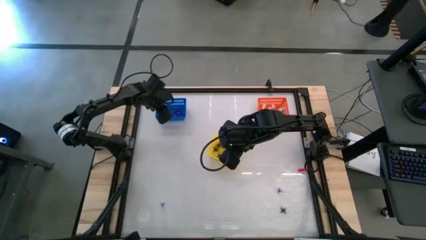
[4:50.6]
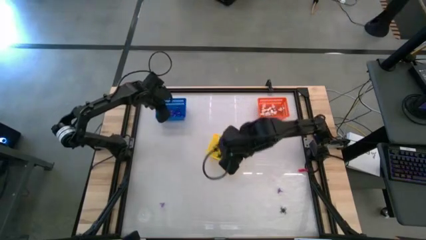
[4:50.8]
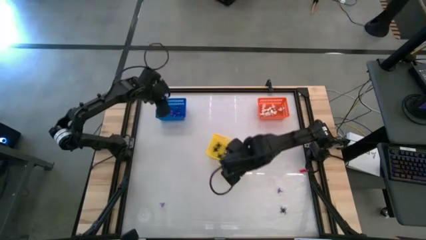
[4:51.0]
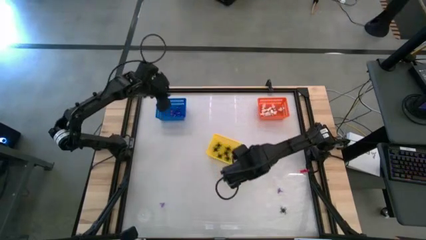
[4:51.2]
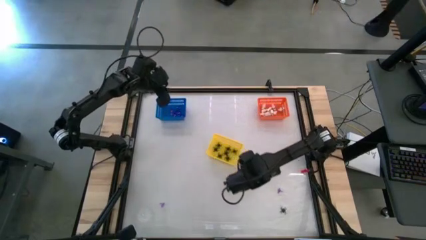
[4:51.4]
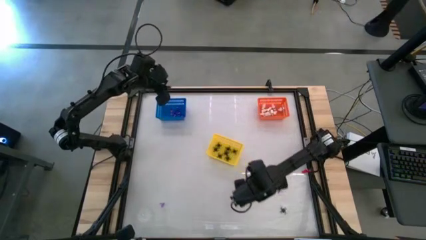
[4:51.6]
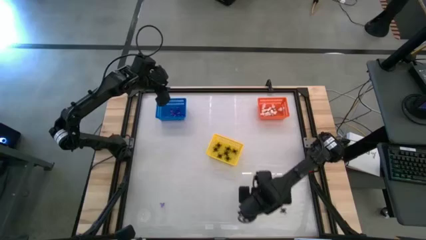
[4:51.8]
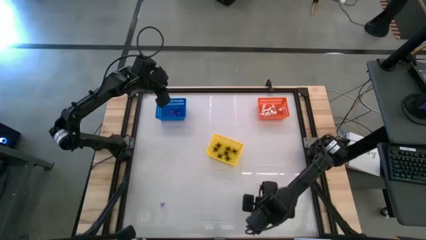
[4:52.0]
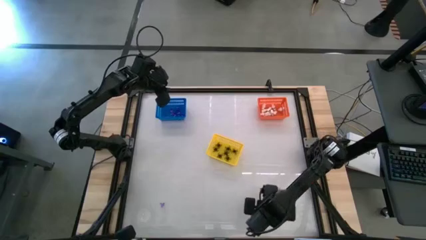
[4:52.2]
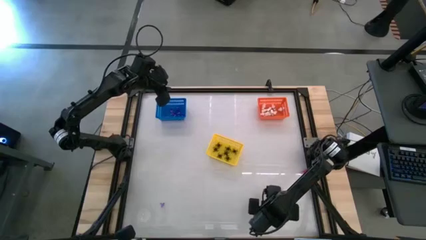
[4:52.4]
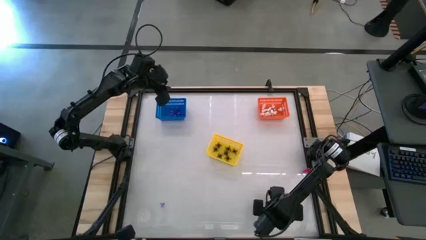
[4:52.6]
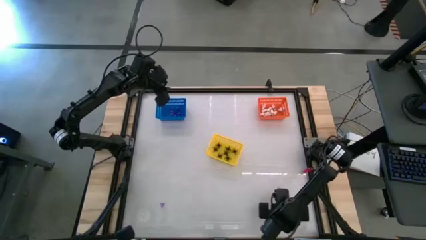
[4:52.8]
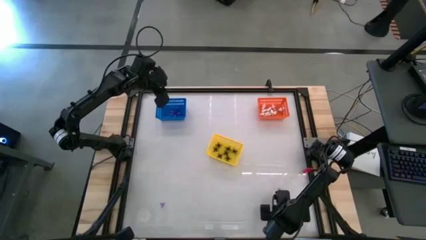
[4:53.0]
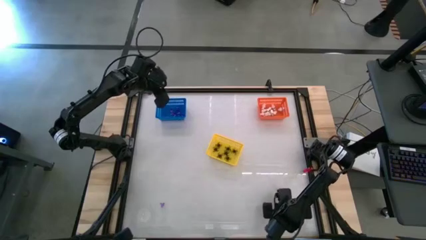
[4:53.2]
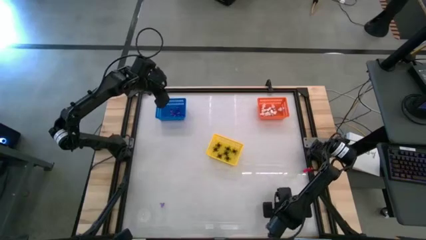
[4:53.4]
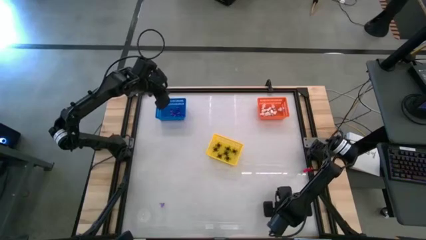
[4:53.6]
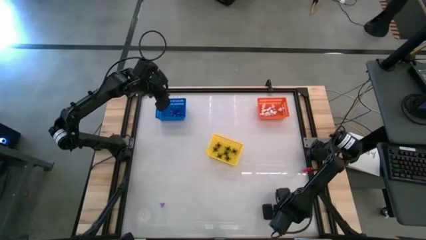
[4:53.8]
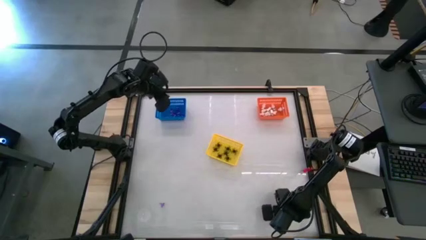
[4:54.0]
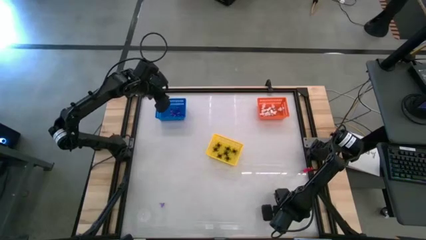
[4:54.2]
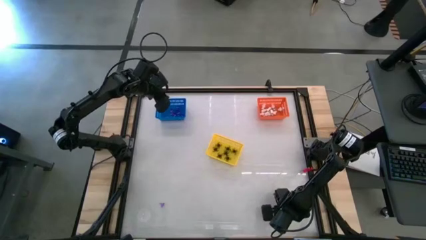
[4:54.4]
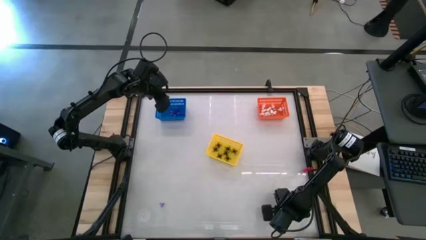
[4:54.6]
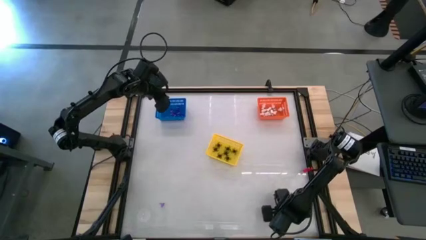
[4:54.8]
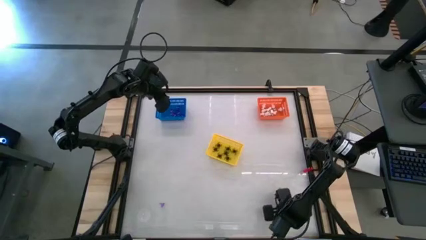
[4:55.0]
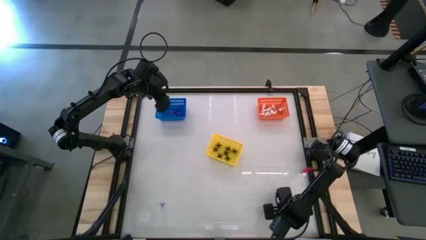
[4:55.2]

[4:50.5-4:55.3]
Task: Sort Halloween decoration
Put the black spider toy into the yellow bin

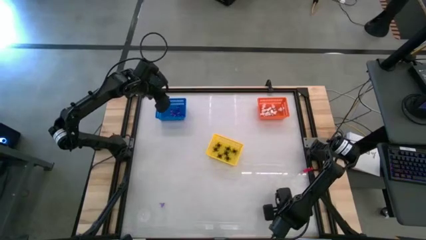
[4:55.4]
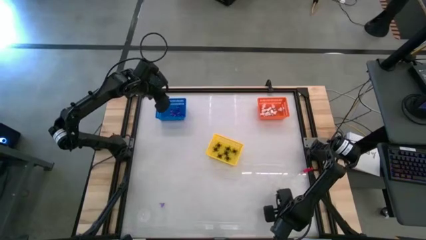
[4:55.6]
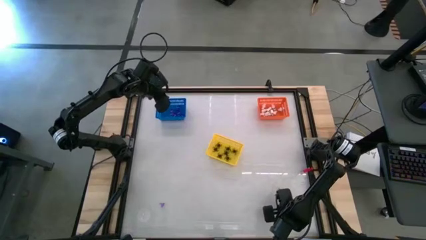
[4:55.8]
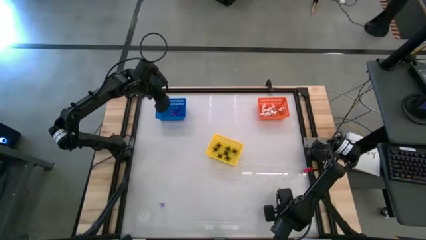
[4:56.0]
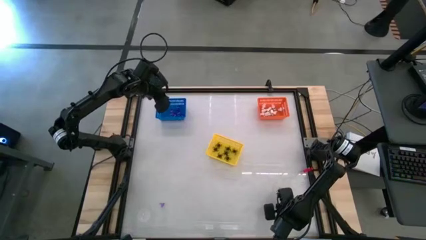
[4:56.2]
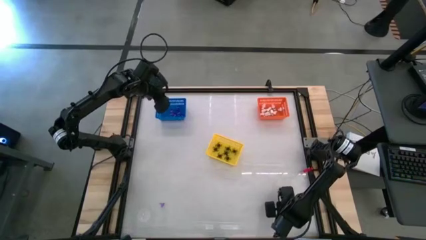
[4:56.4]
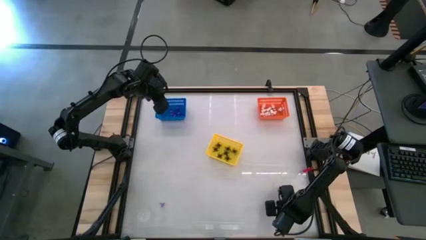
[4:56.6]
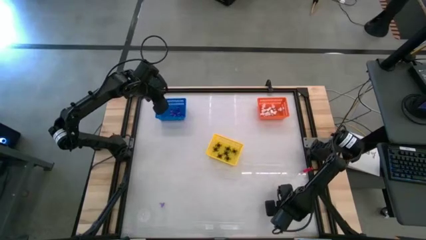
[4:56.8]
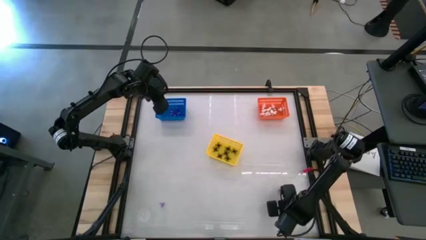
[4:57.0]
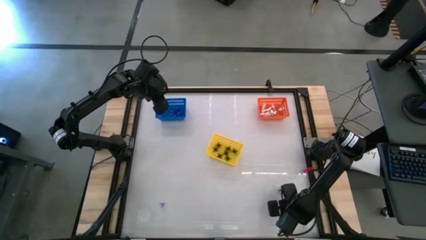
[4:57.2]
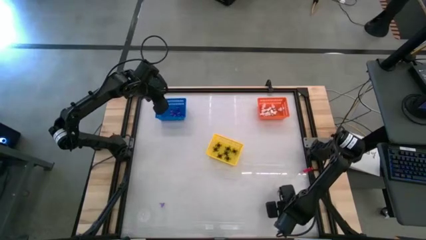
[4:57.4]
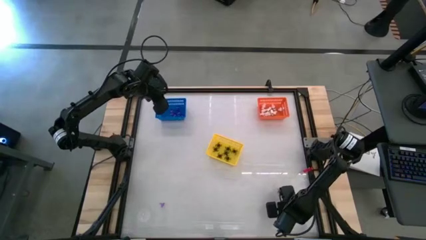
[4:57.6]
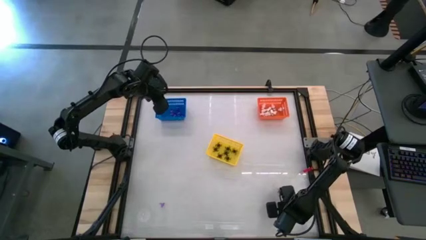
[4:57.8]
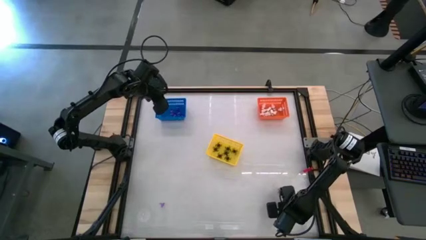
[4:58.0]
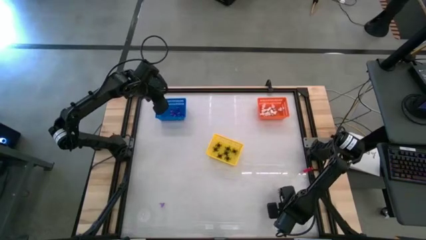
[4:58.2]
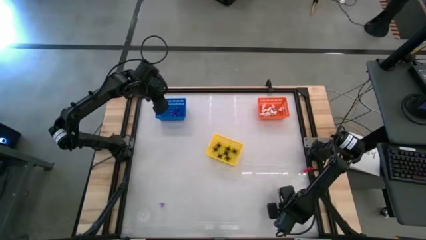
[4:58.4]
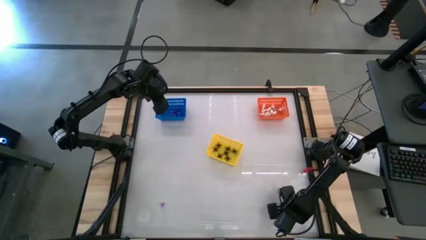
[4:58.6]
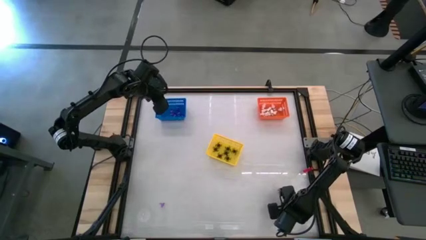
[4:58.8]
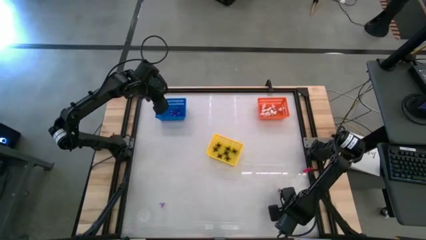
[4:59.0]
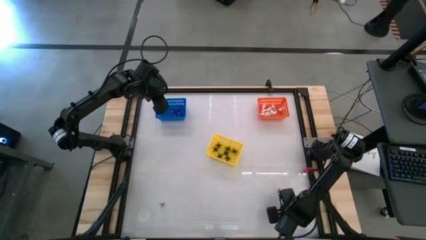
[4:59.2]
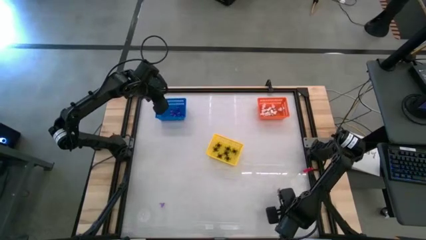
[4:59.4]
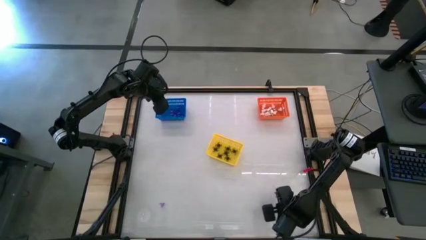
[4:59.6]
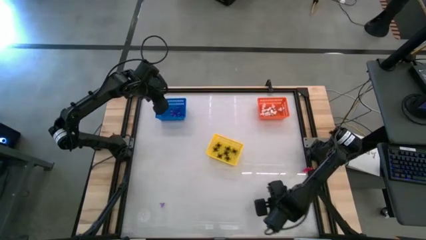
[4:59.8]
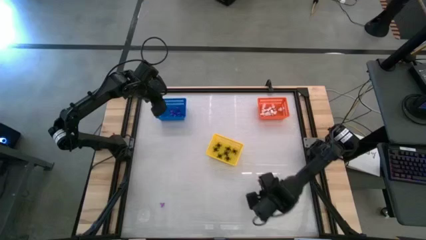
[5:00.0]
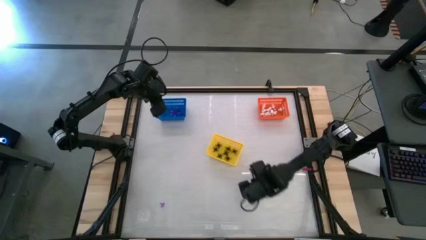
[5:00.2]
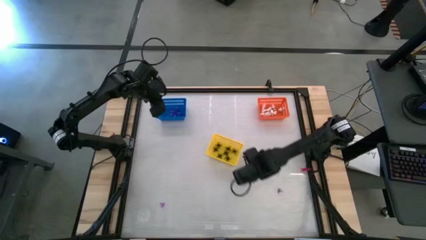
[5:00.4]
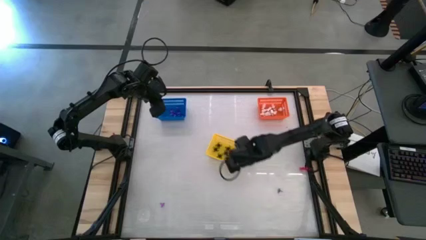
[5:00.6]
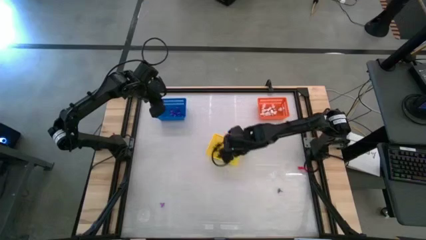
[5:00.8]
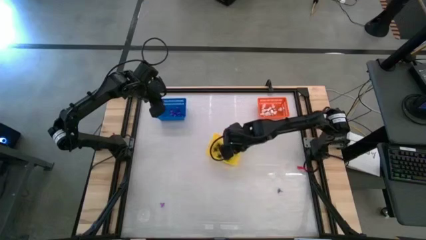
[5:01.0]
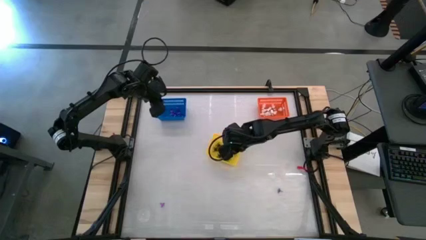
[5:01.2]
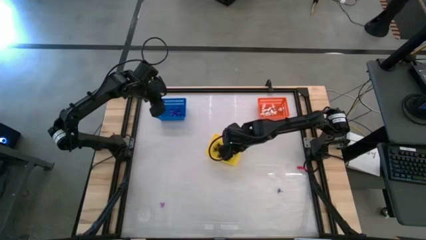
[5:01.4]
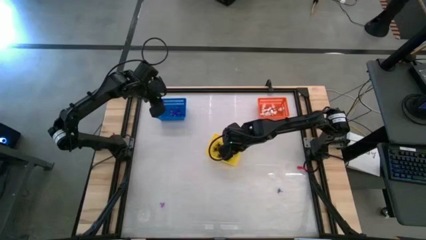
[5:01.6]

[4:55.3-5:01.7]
Put the black spider toy into the yellow bin

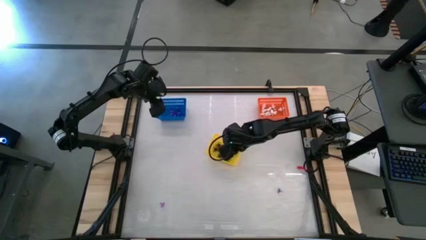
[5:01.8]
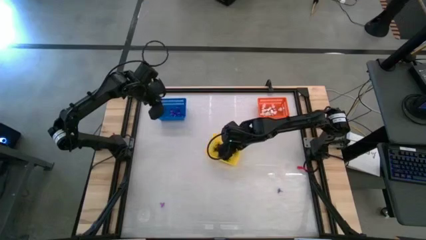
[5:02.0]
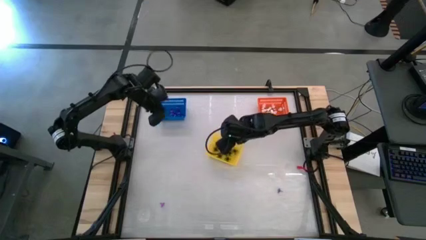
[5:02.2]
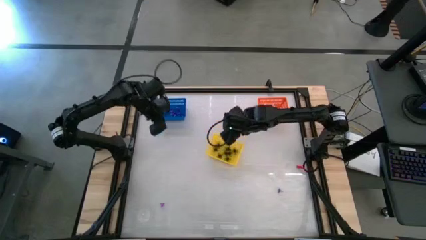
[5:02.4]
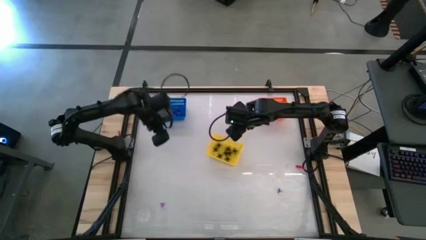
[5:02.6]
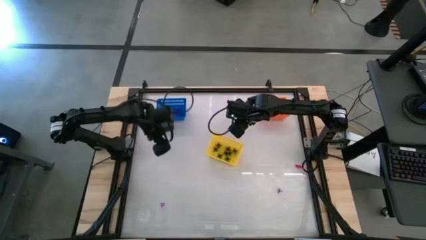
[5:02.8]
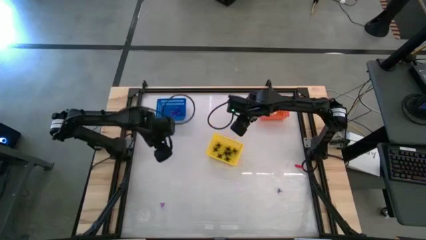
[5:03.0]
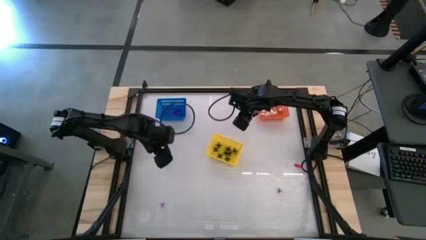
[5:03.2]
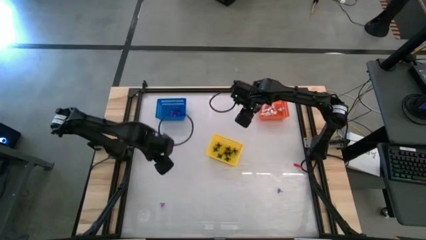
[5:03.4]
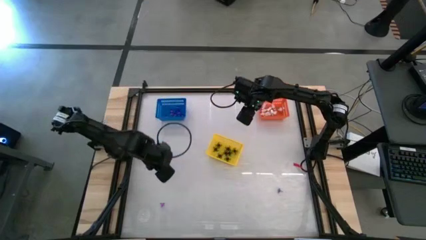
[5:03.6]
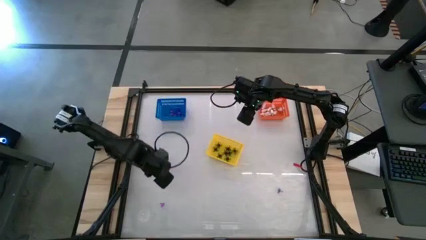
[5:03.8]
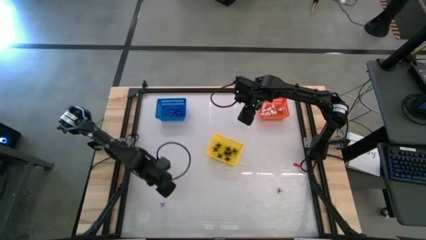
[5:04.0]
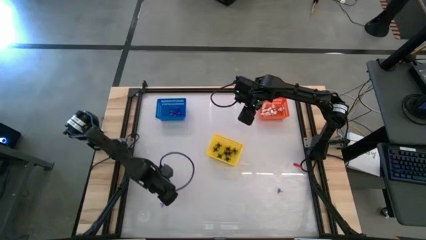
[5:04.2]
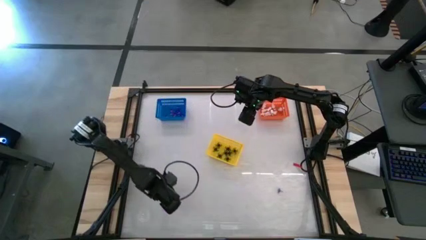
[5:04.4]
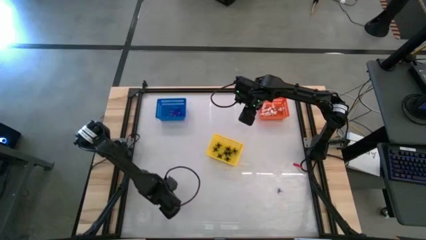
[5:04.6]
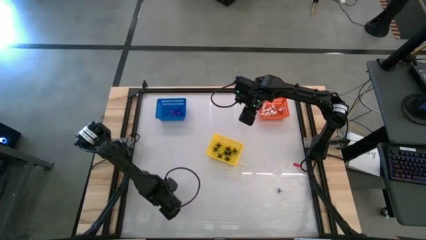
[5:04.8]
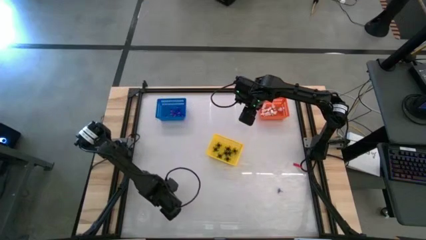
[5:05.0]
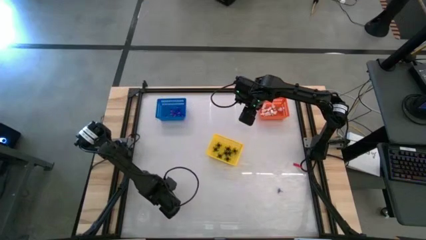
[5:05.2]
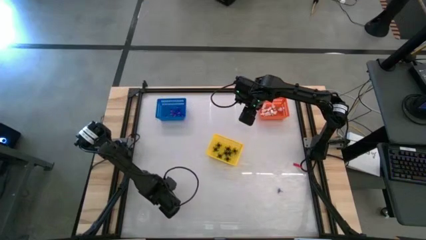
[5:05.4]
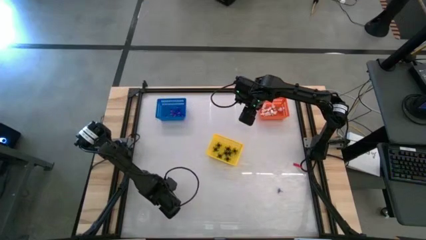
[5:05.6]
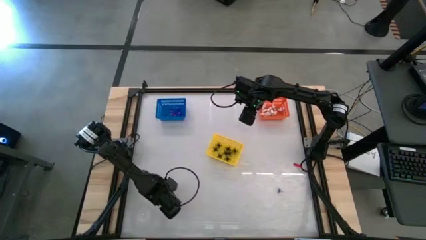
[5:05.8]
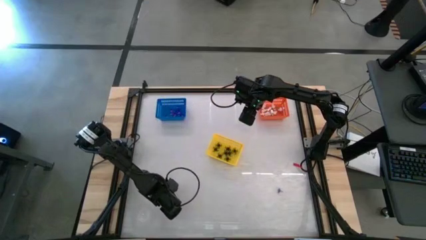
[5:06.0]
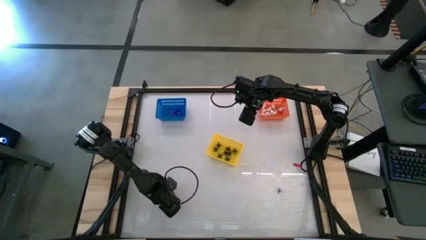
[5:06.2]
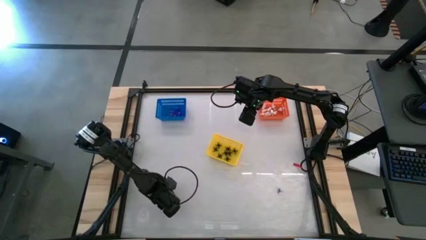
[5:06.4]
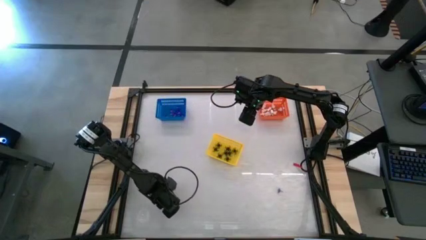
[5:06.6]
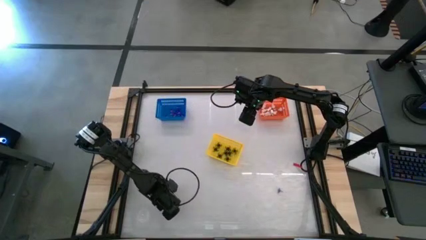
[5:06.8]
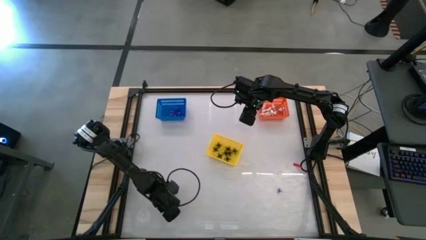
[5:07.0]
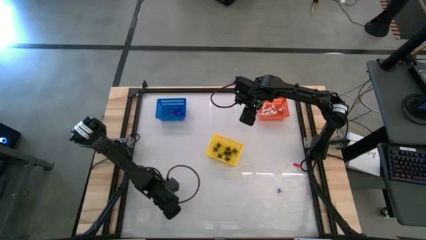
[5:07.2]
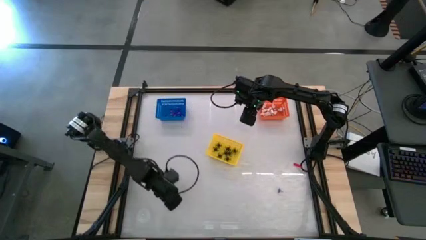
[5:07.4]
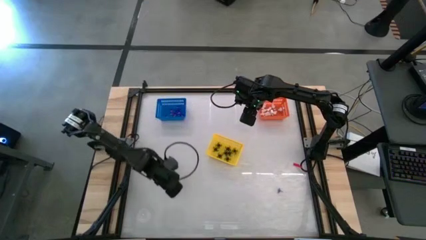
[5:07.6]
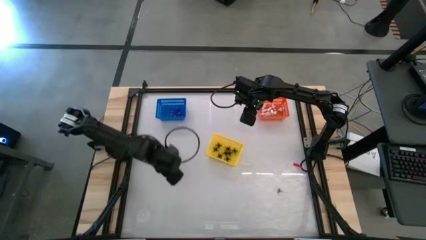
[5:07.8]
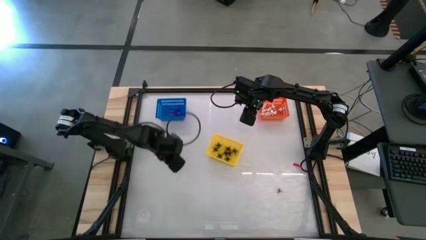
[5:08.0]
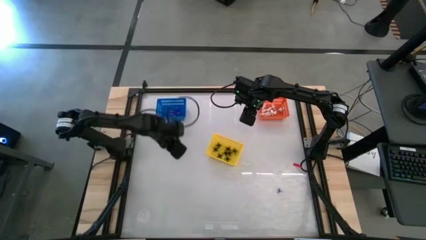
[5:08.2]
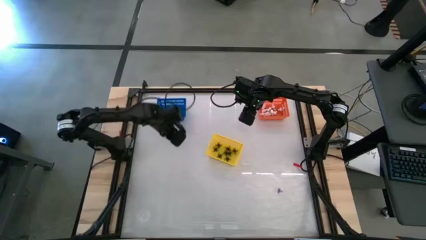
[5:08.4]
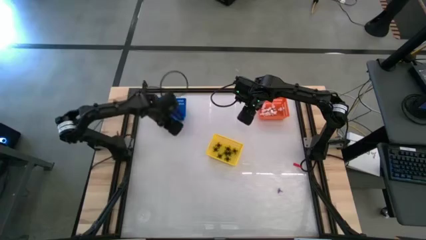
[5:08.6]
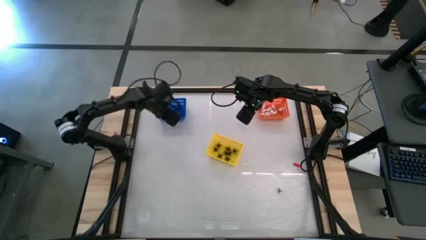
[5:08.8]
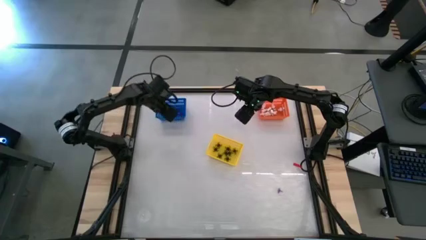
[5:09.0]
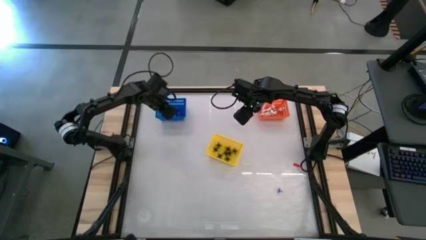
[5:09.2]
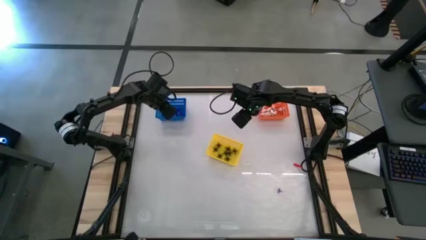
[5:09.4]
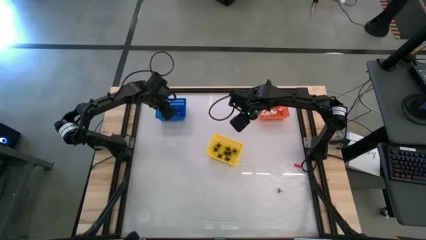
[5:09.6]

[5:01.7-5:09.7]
Put the purple witch hat toy into the blue bin
